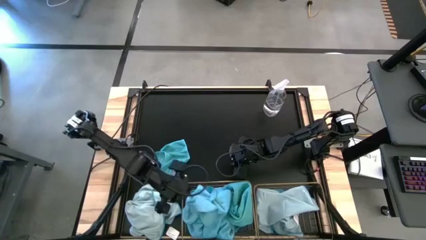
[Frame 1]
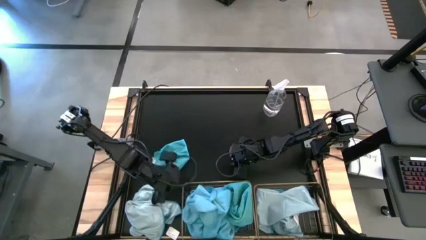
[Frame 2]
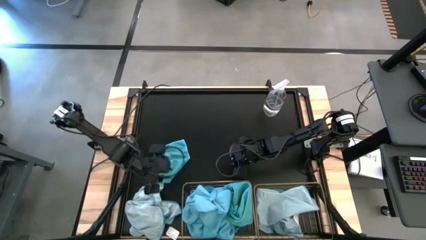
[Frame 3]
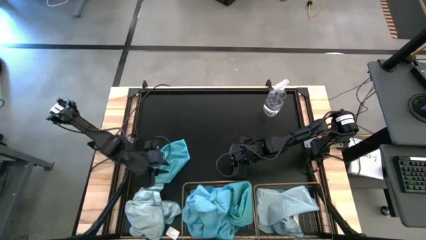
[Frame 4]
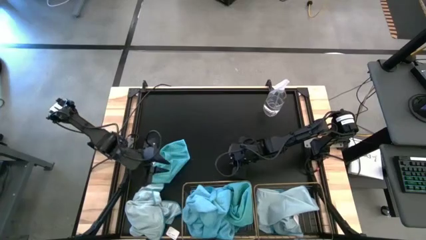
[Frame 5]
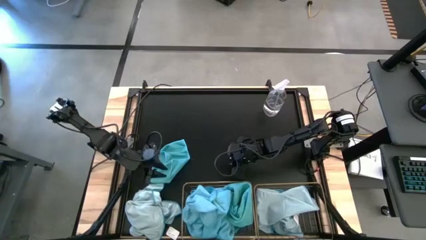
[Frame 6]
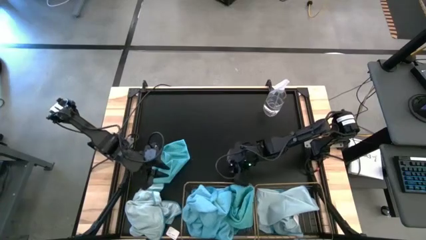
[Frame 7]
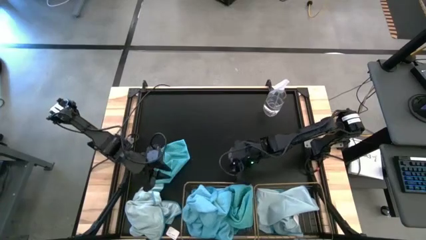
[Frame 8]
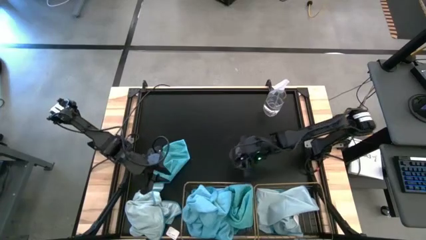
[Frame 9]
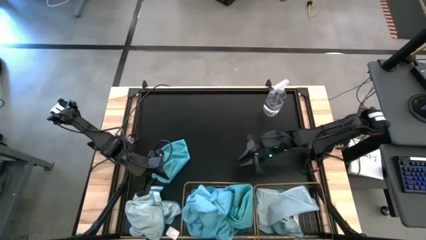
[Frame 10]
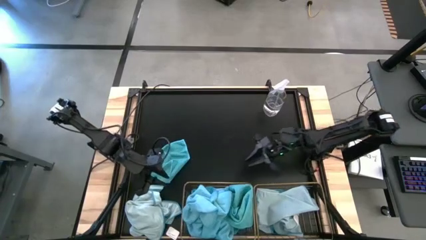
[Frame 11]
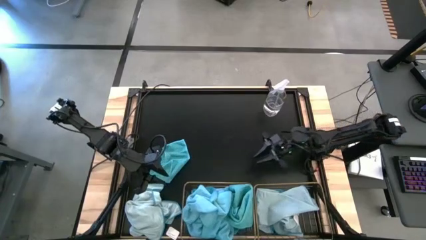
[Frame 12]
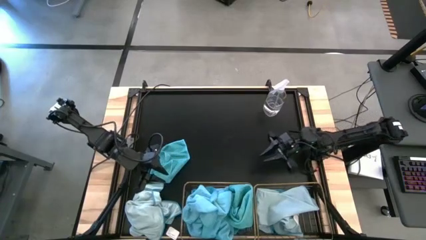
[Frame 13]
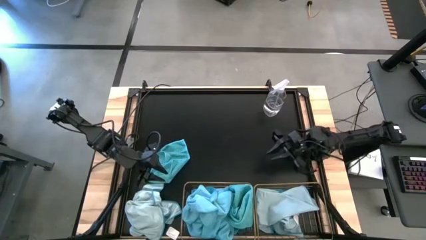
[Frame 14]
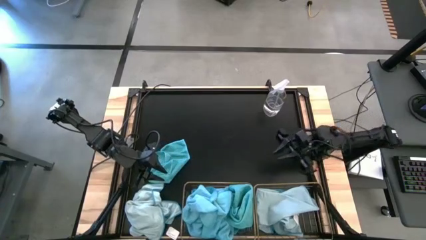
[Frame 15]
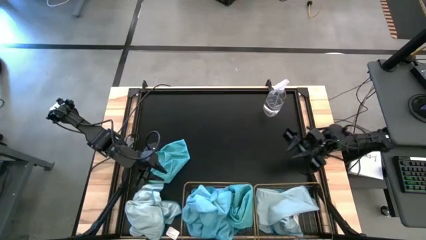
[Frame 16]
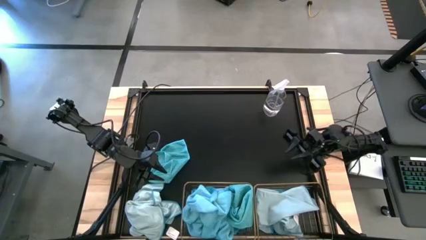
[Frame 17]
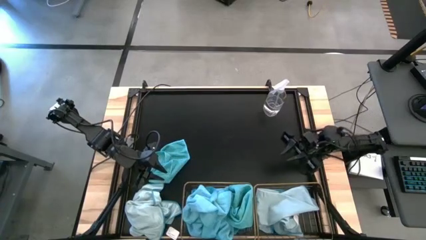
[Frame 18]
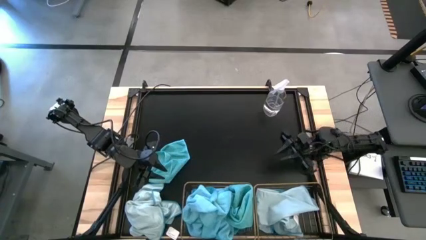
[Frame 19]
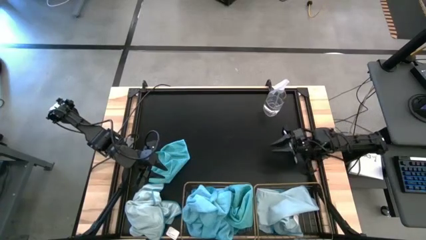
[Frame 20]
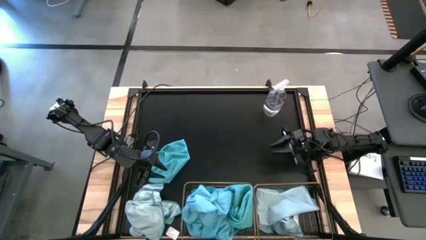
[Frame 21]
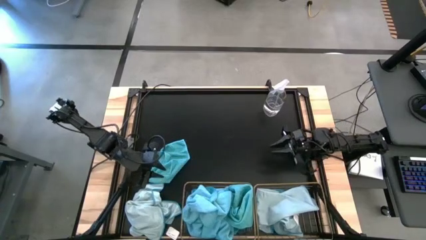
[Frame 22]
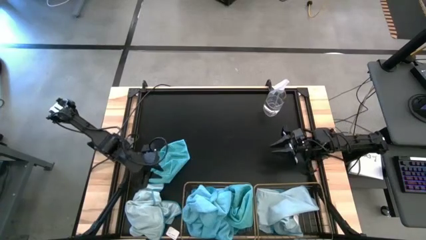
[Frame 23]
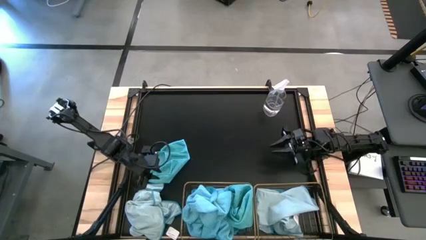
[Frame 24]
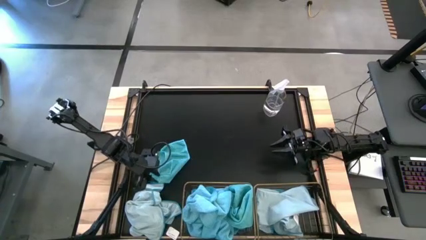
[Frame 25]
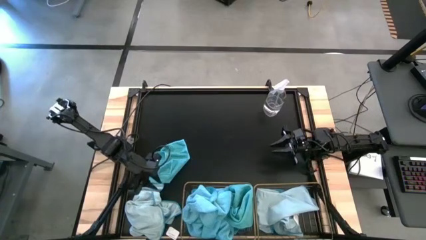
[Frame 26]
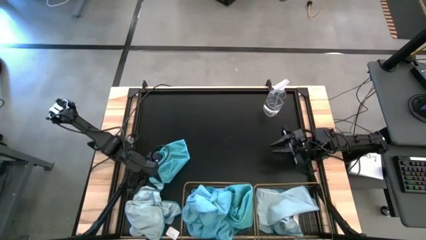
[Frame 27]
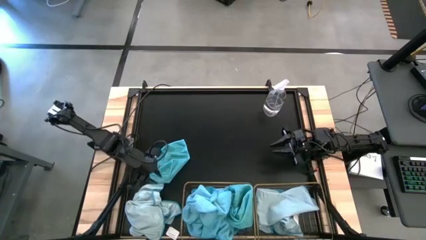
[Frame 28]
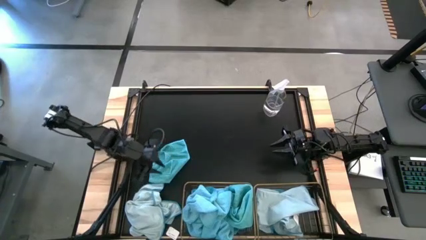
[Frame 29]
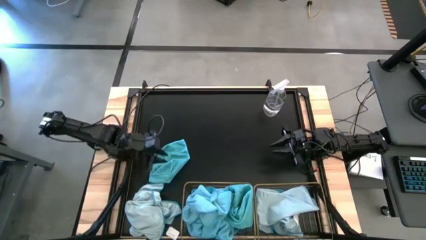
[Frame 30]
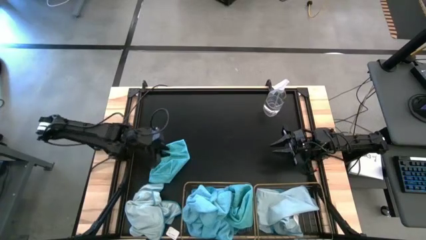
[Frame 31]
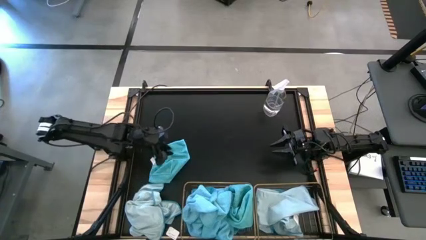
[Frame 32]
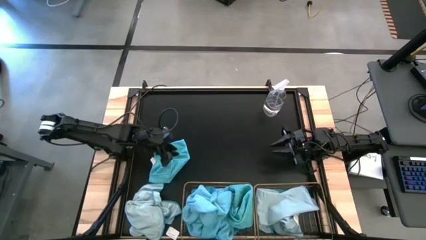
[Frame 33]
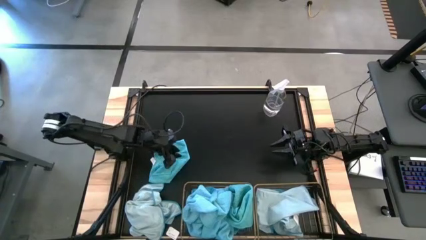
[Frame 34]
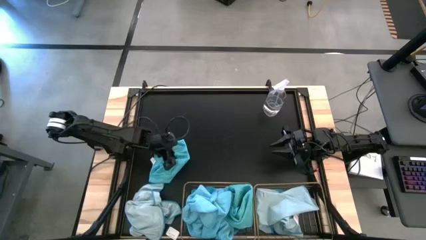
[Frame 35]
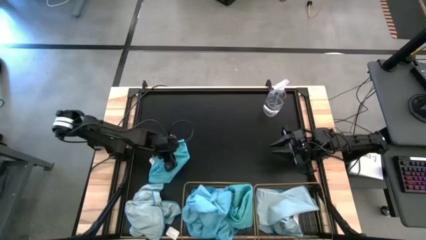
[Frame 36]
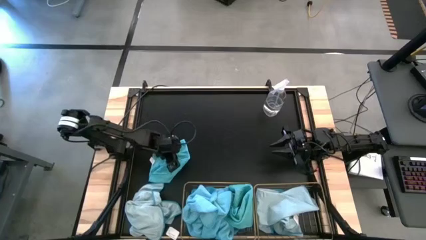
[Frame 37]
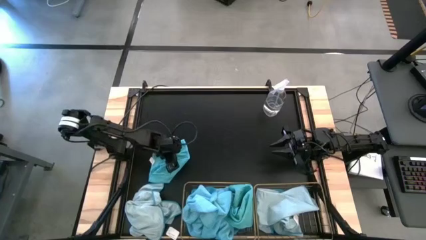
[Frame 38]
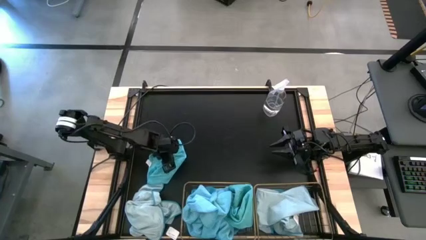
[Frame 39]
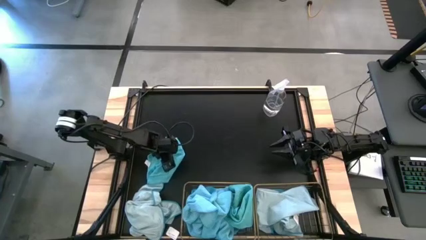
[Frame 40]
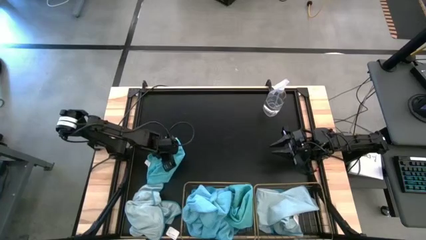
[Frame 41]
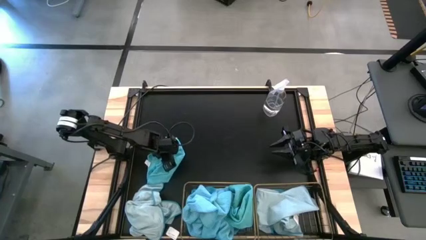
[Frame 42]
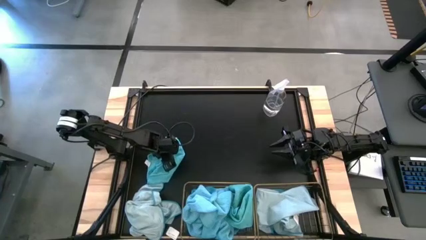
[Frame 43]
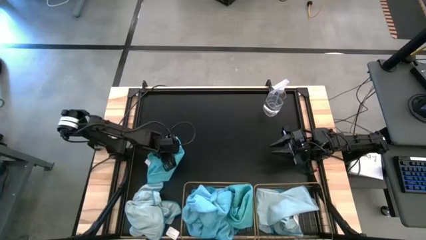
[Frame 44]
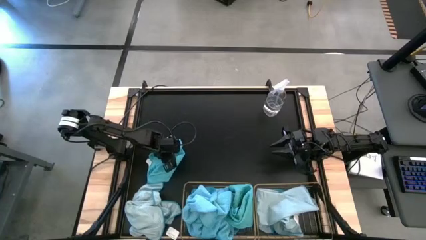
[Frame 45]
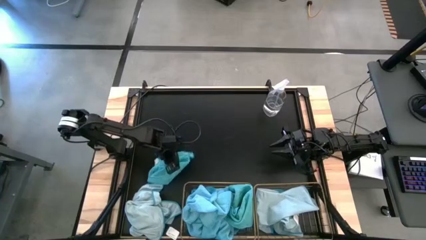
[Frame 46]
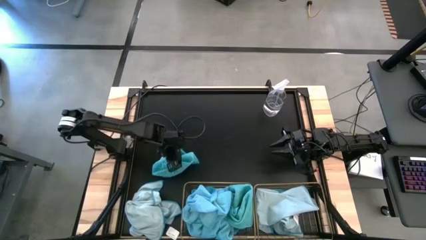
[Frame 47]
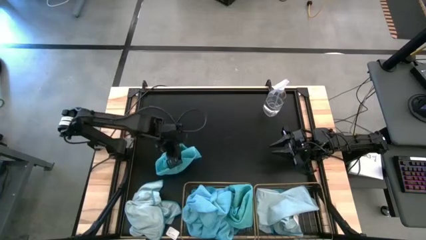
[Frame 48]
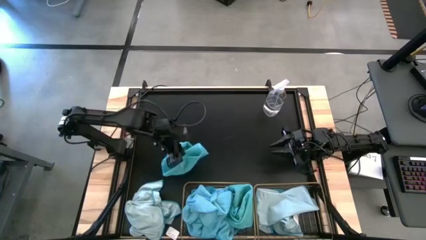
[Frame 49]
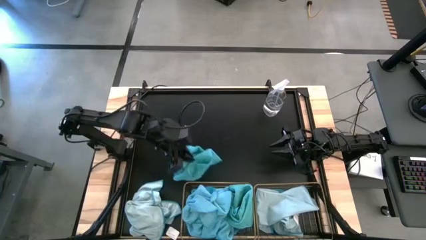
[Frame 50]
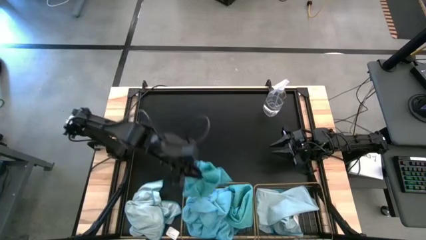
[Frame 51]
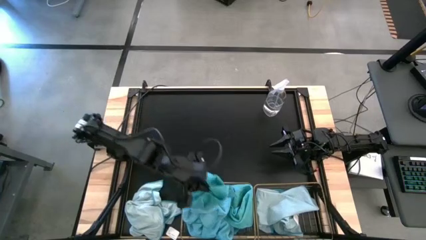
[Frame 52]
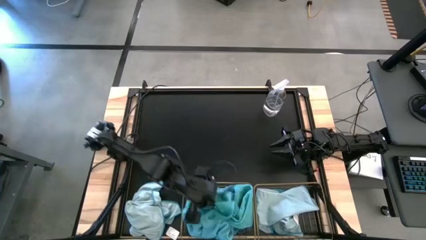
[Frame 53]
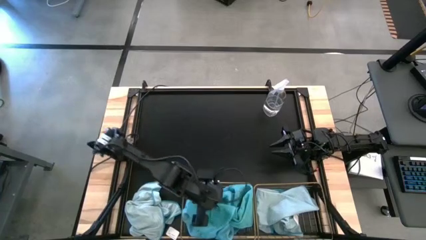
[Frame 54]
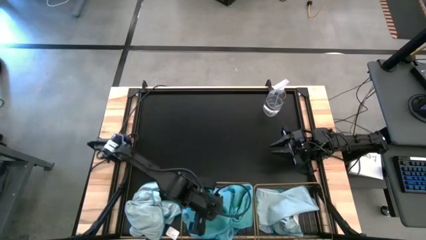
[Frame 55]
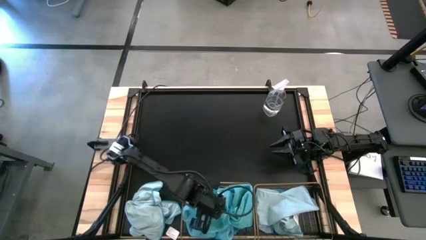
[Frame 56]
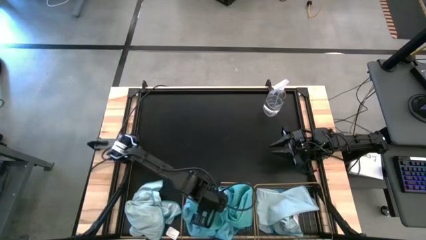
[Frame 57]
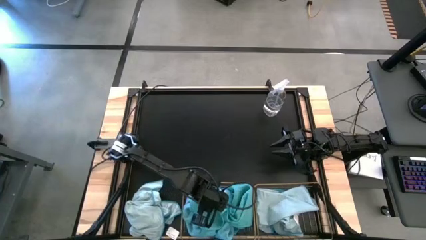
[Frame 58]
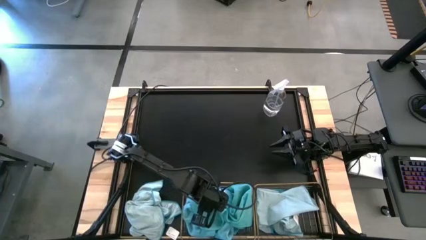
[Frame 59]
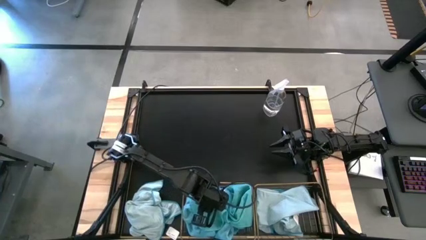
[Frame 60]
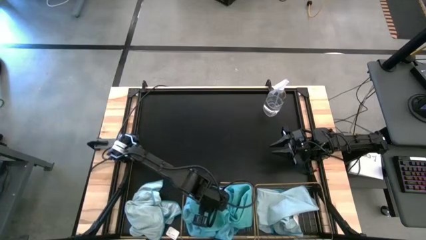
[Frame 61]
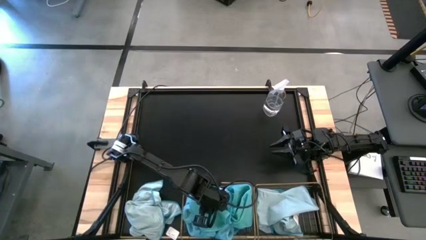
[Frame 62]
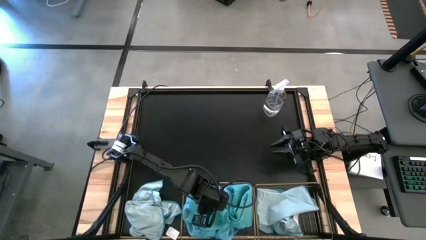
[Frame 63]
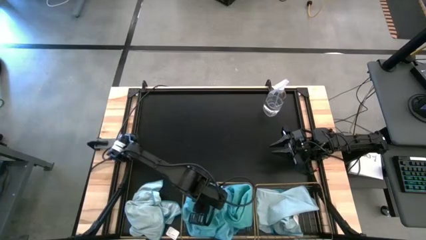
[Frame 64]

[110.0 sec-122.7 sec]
Task: Sort microfiber towel by color & place in baskets
Put the blue towel into the left wire basket
